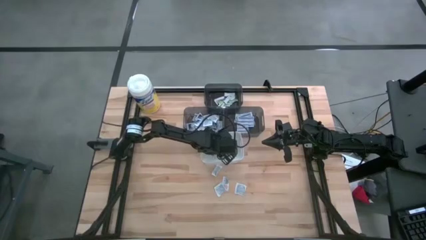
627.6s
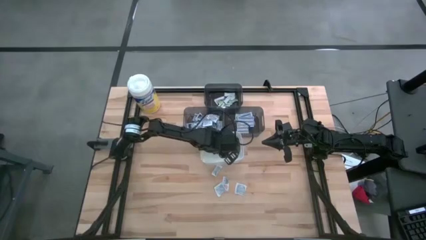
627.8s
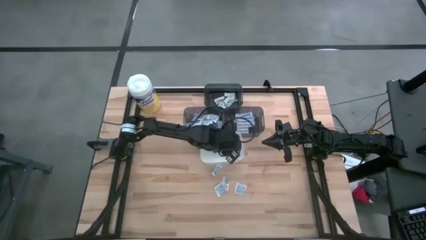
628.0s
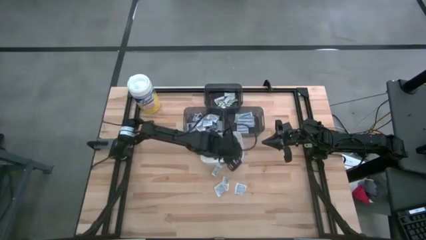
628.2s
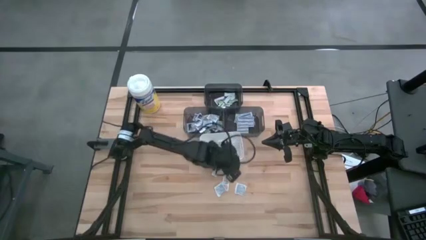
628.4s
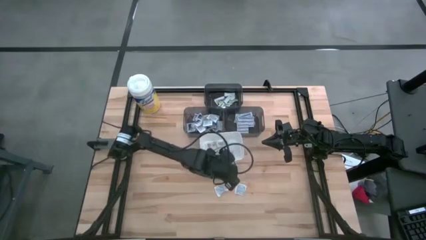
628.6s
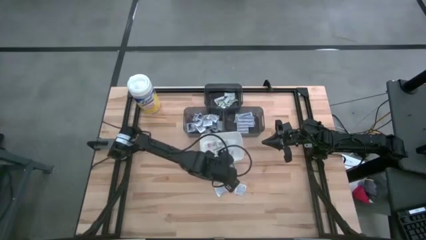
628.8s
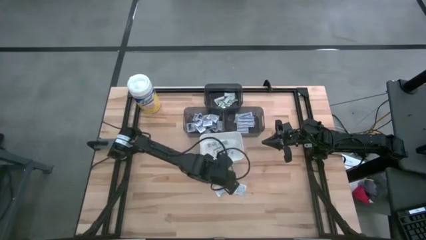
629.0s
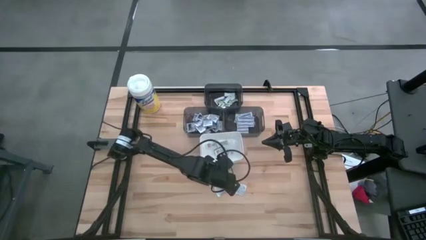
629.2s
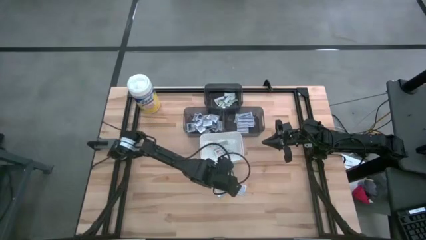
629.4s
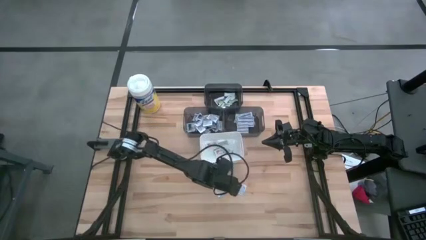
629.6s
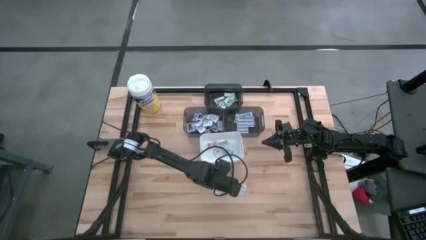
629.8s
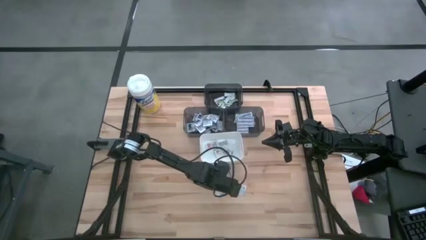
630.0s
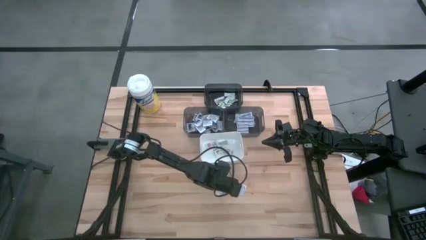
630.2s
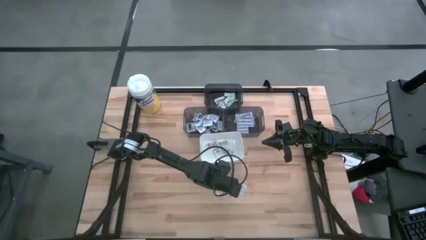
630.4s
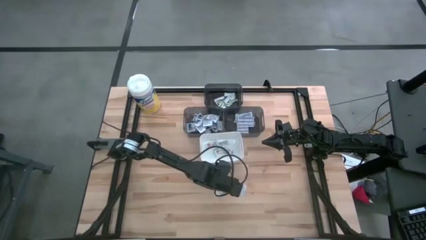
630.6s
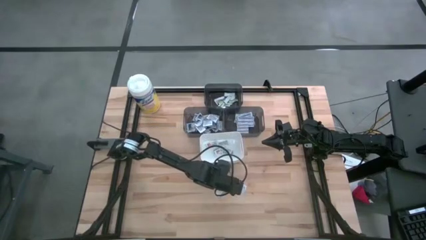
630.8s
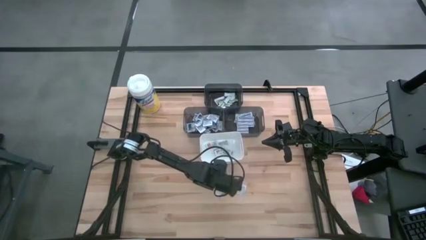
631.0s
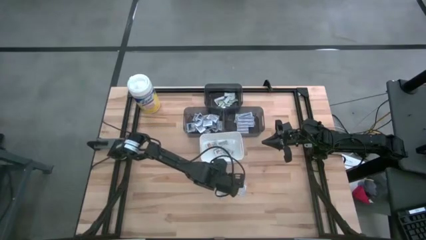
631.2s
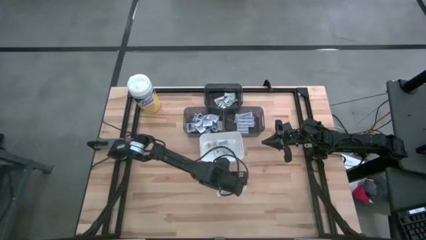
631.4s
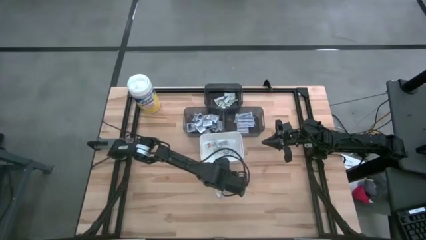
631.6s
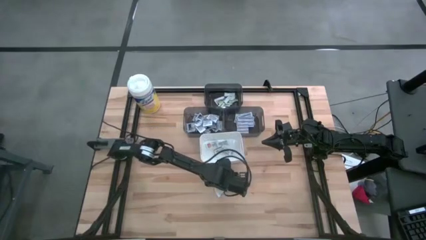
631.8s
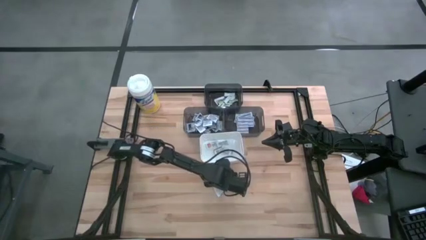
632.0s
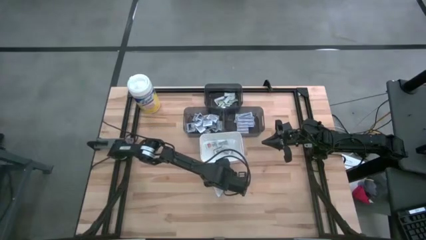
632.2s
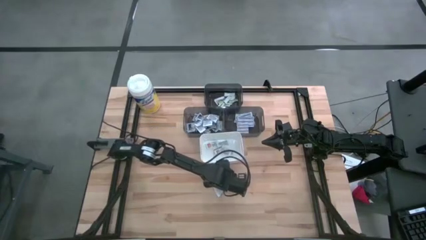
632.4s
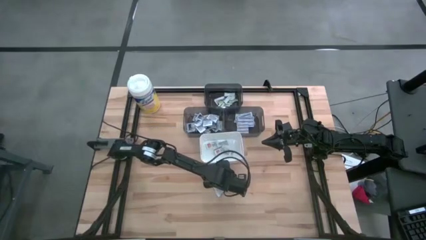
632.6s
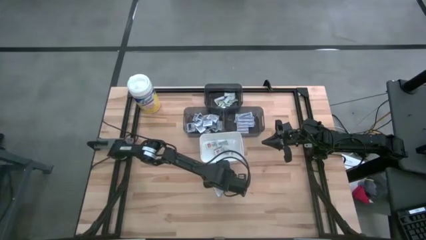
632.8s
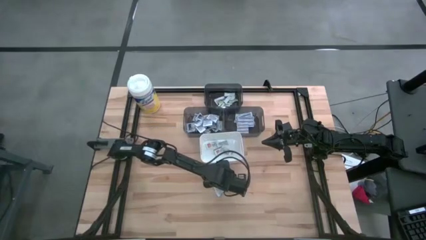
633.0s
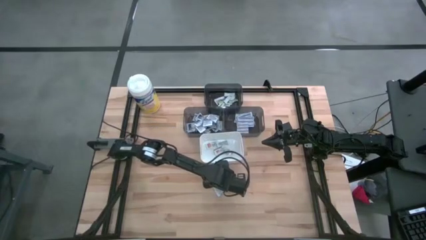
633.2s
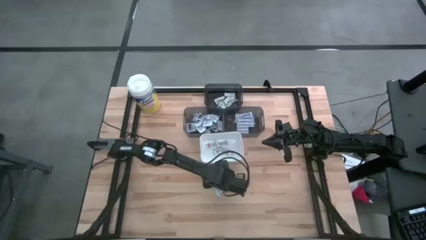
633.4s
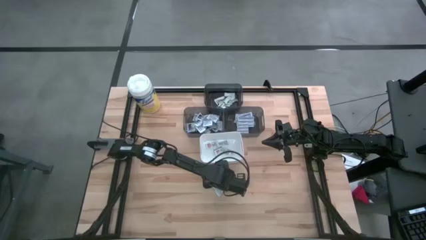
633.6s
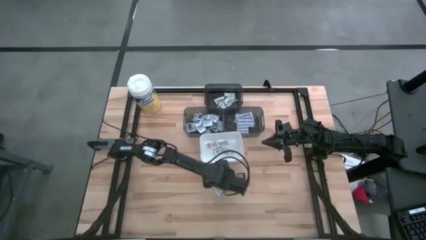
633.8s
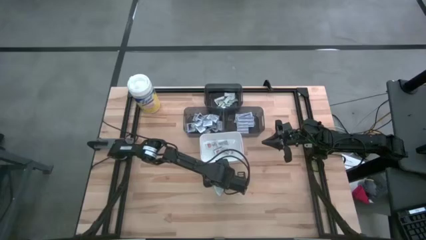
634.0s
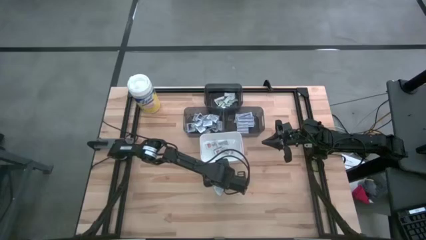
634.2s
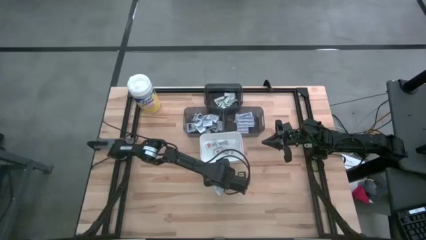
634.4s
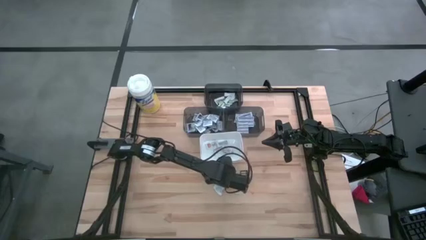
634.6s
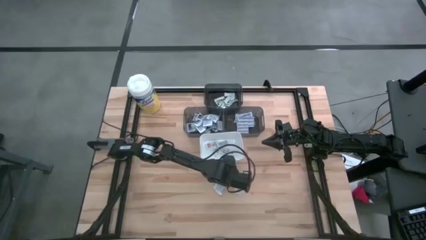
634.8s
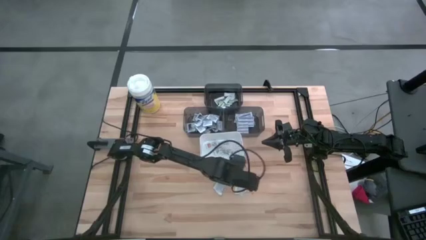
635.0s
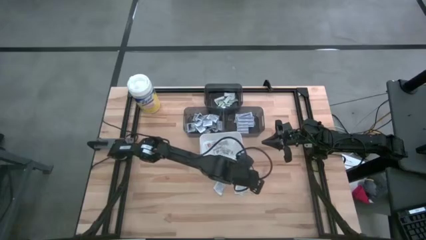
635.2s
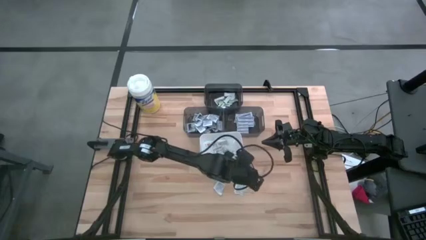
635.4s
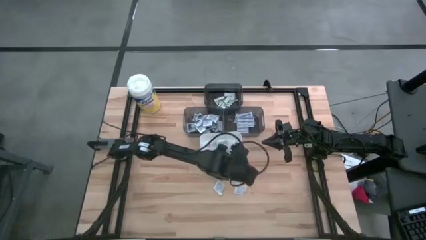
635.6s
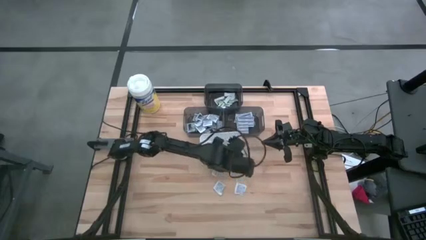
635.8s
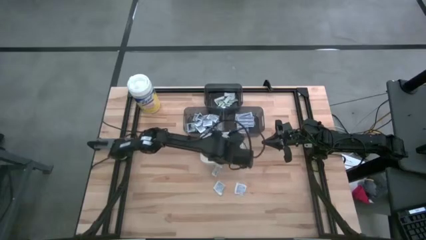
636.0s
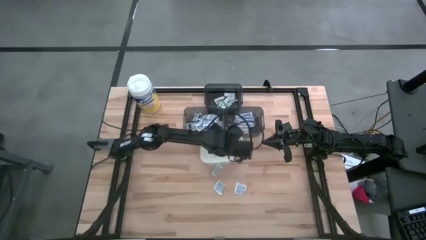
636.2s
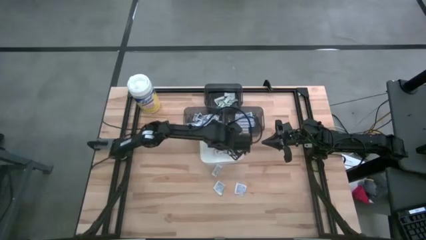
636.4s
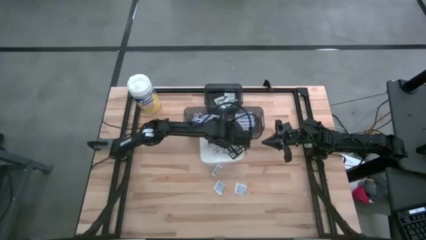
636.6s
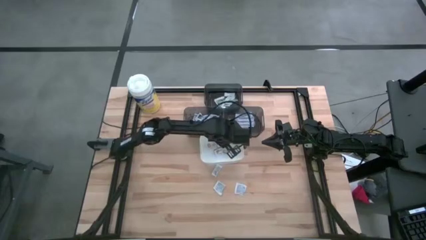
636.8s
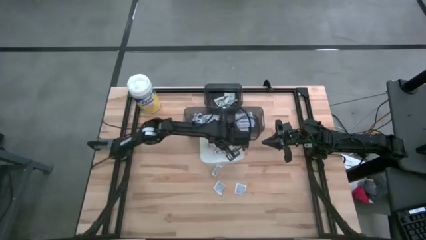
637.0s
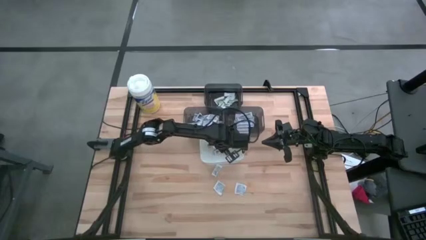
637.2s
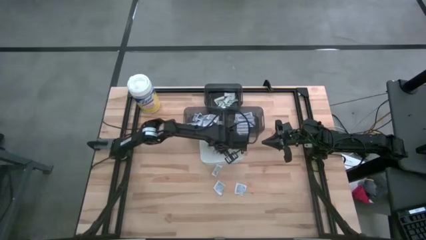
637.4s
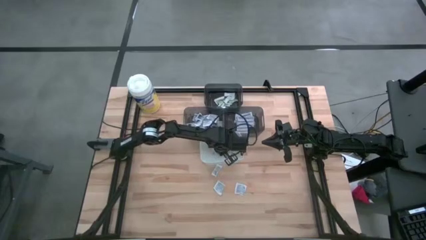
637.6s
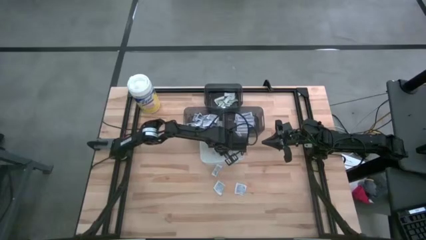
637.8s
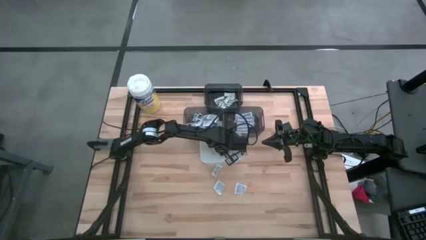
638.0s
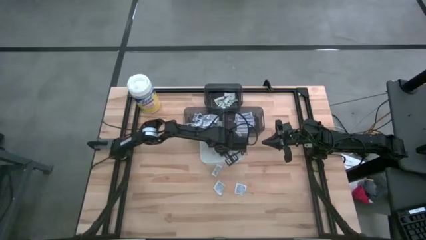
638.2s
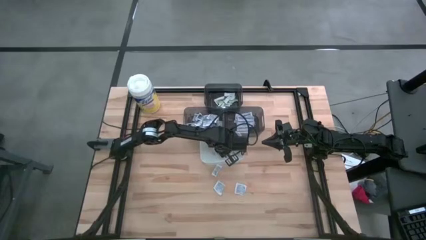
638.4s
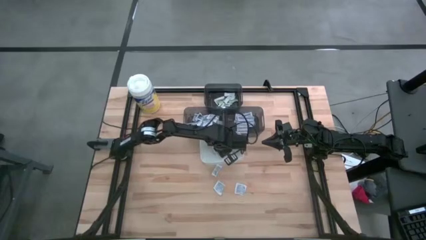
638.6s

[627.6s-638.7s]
Task: Pick & Place First Aid Supplies
Put the ointment pack into the white bin

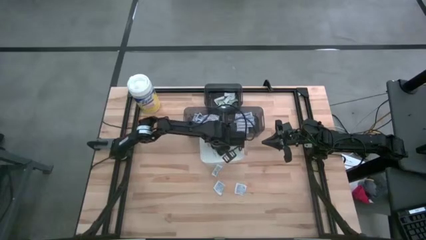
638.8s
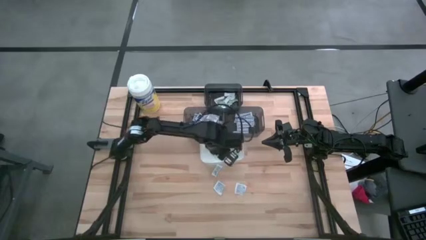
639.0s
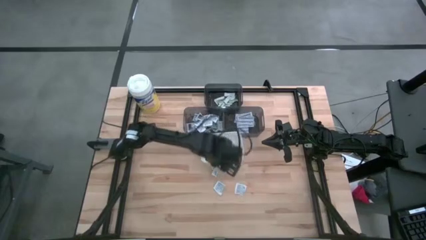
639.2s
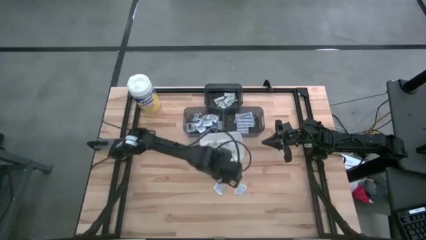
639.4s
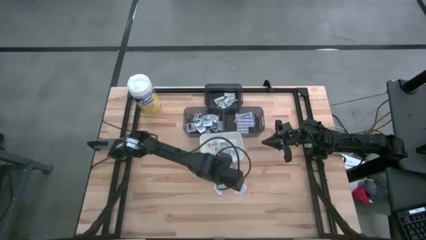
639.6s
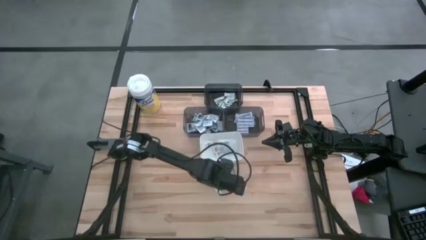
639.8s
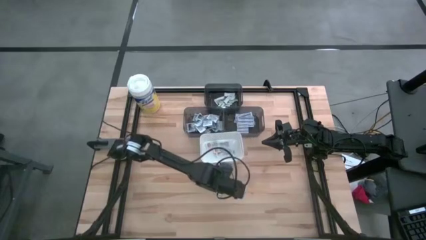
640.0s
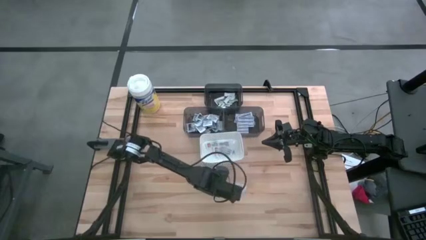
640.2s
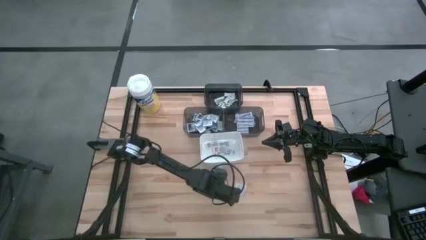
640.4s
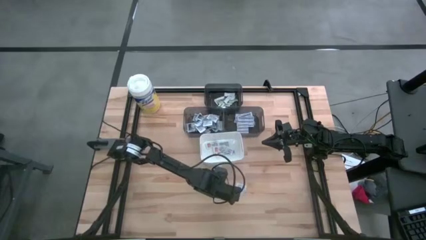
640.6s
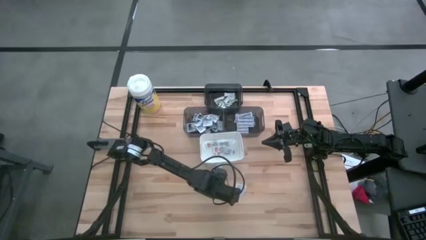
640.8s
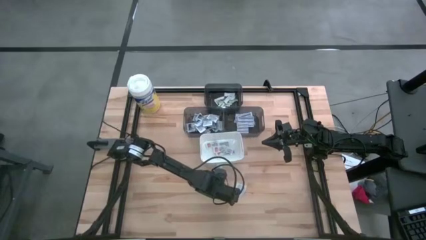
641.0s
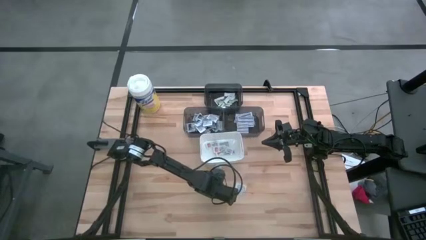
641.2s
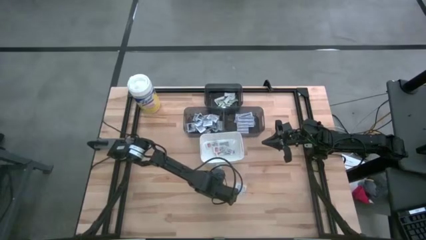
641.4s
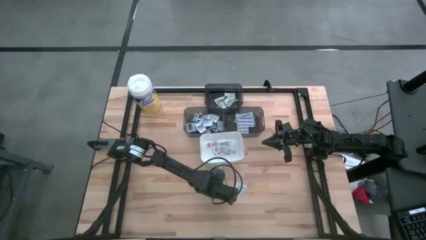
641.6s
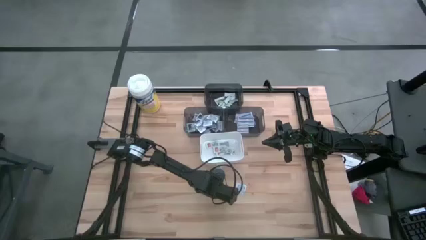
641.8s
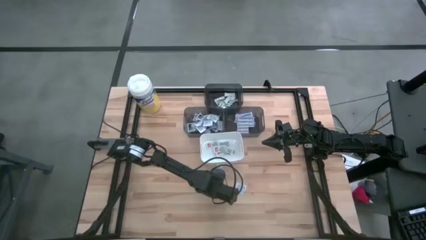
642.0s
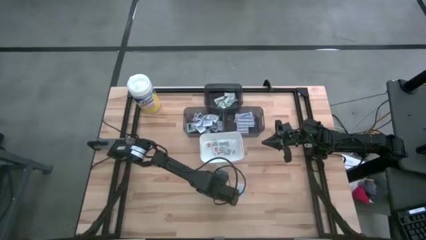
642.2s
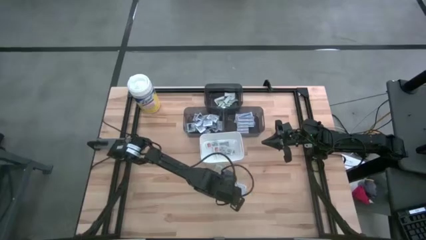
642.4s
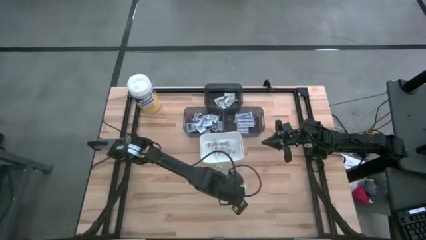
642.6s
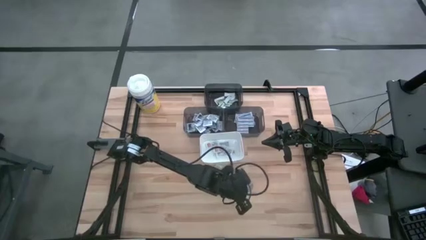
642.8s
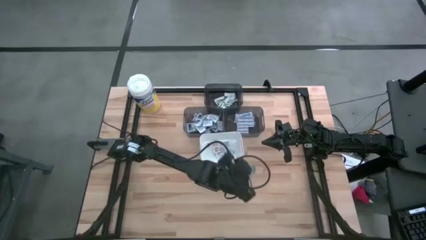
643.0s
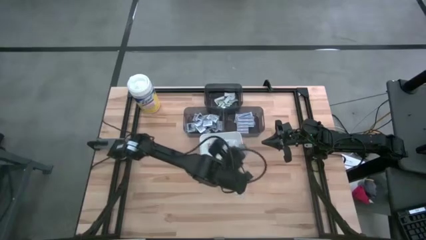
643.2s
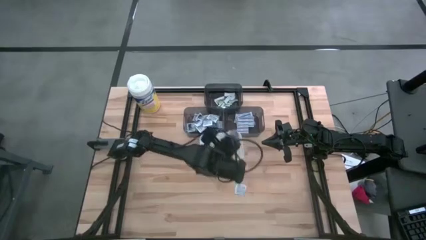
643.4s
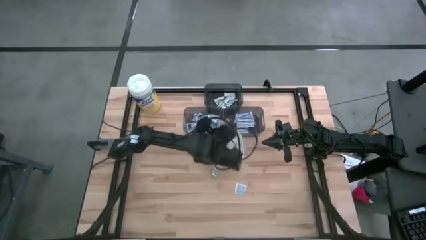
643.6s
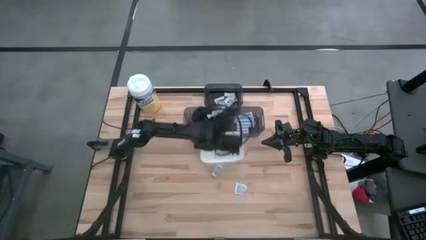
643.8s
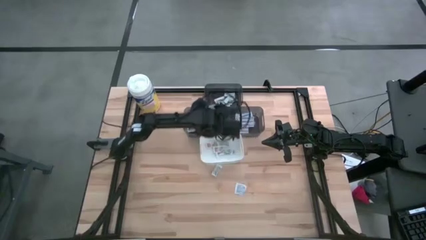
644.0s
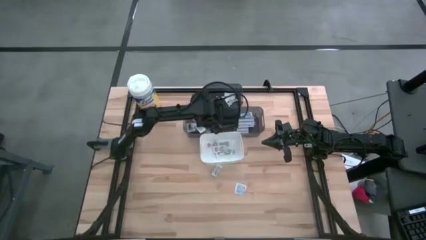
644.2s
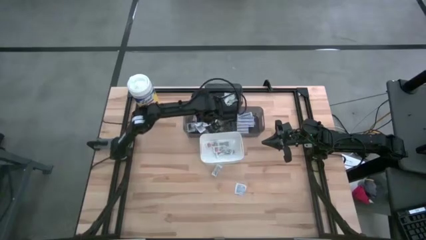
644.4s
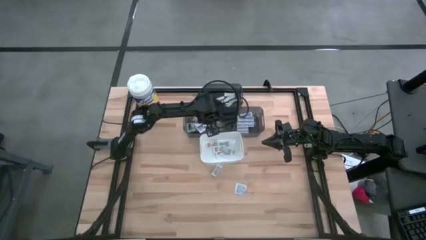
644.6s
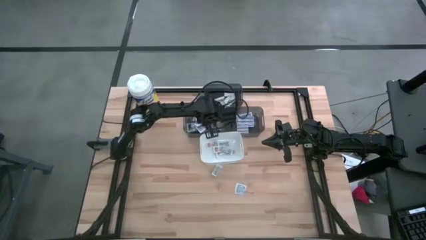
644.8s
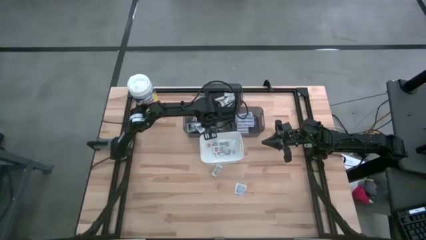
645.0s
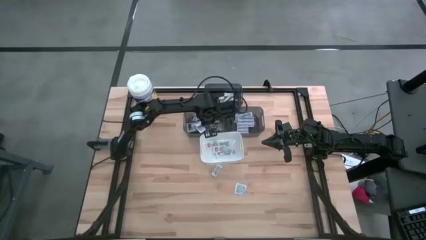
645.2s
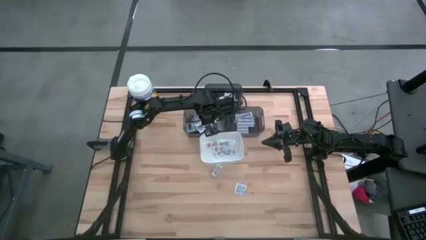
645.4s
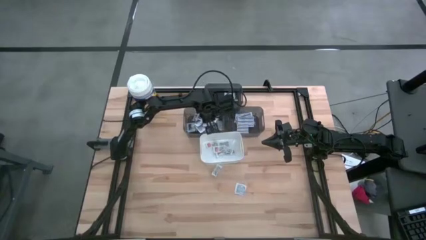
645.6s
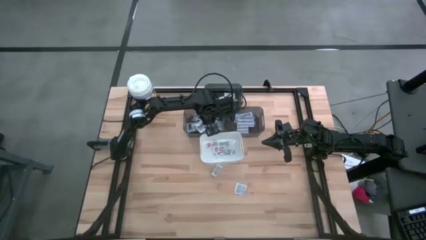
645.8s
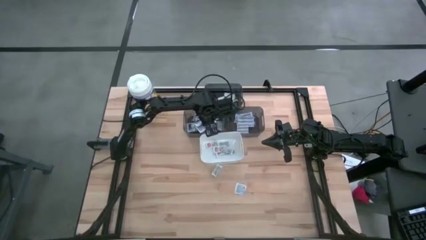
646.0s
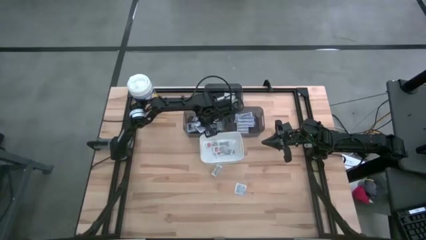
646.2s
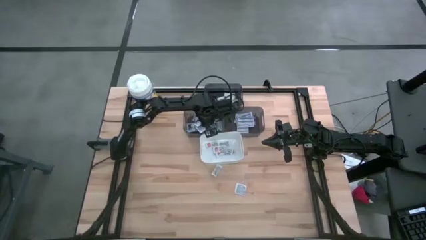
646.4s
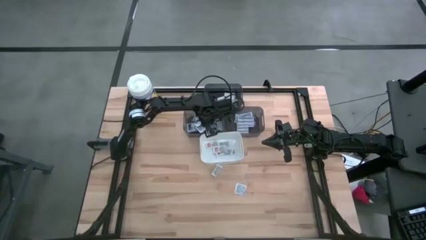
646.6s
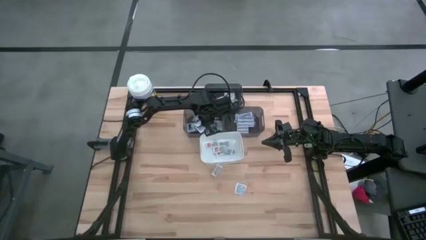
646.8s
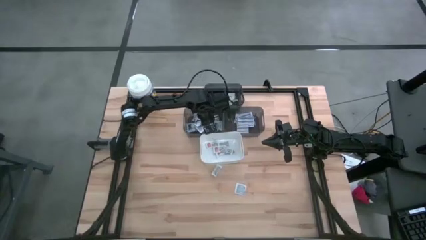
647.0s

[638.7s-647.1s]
Put the alcohol pad into the left black bin
